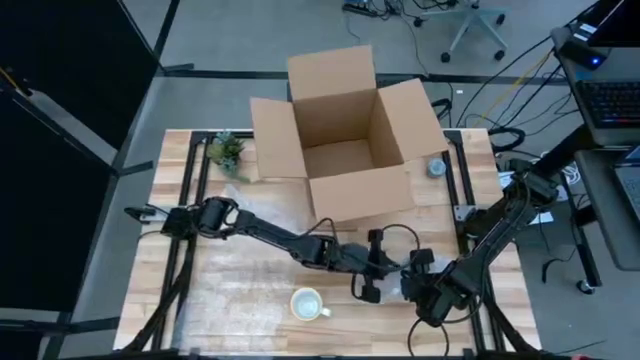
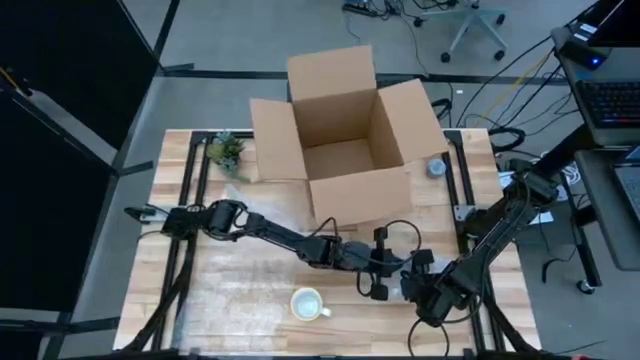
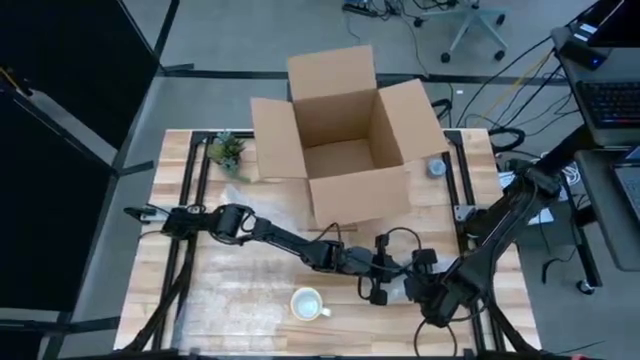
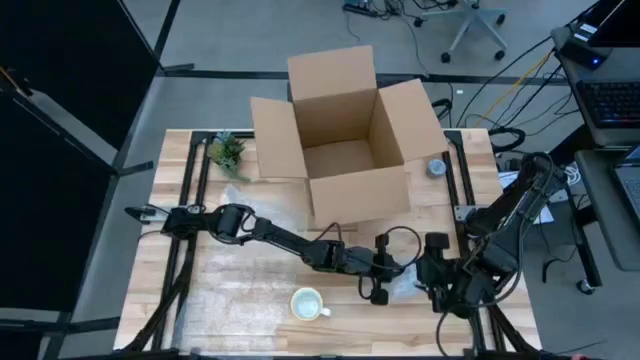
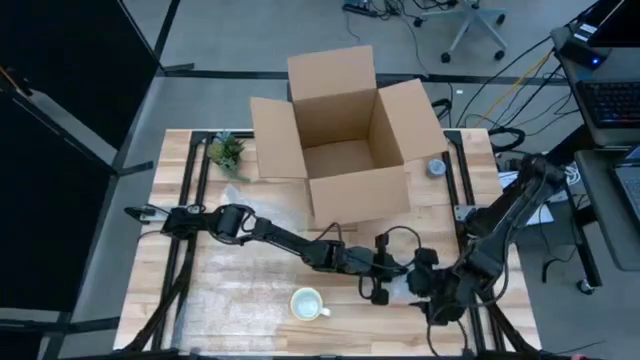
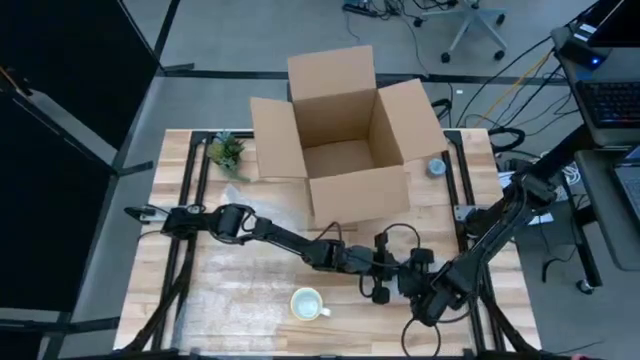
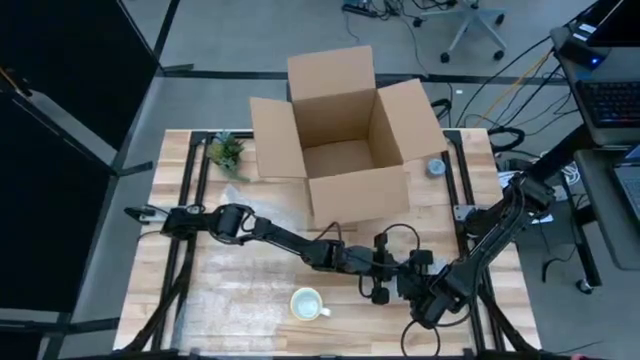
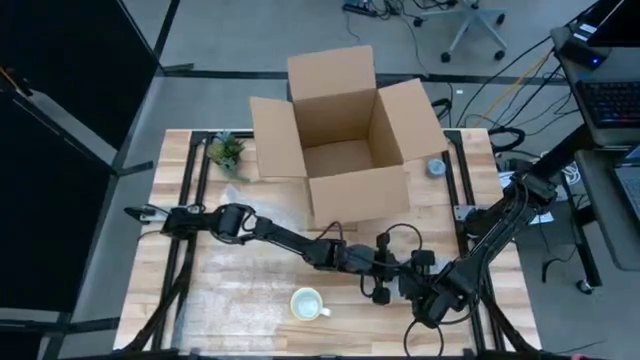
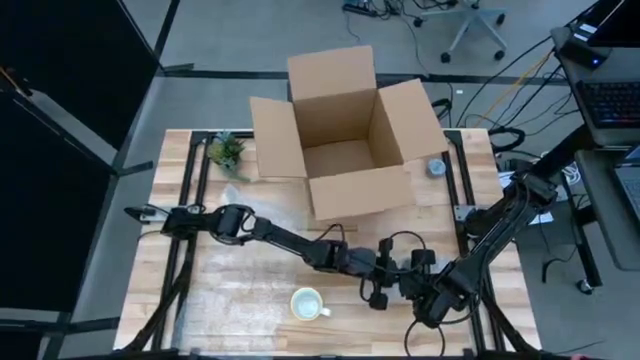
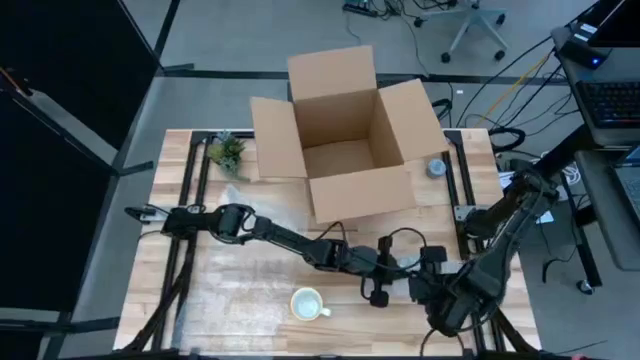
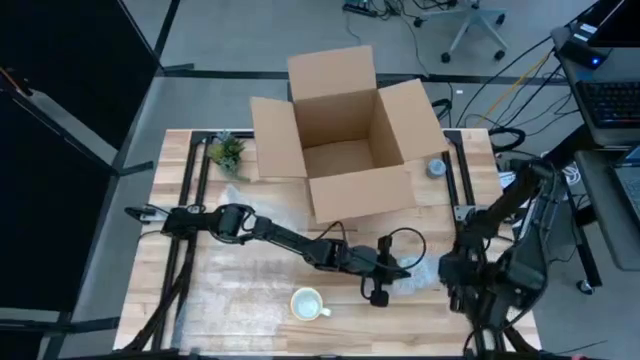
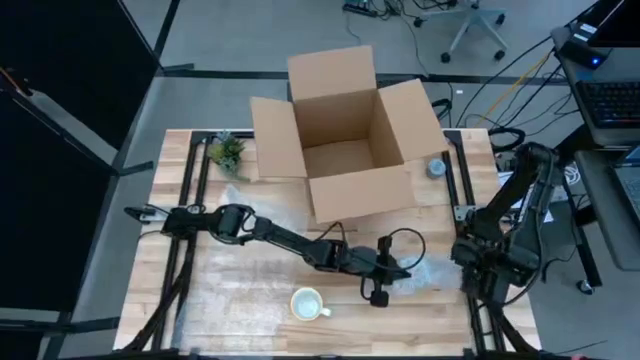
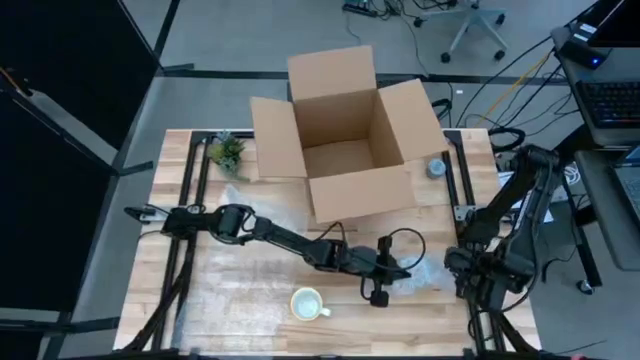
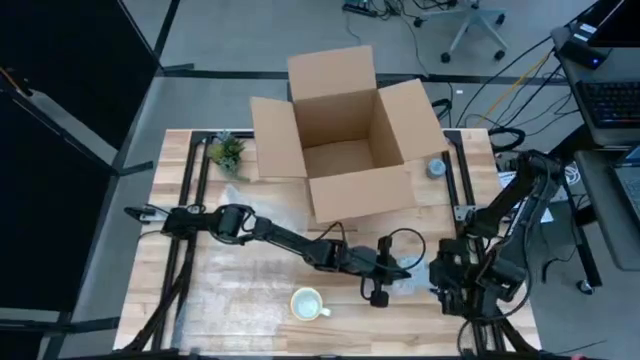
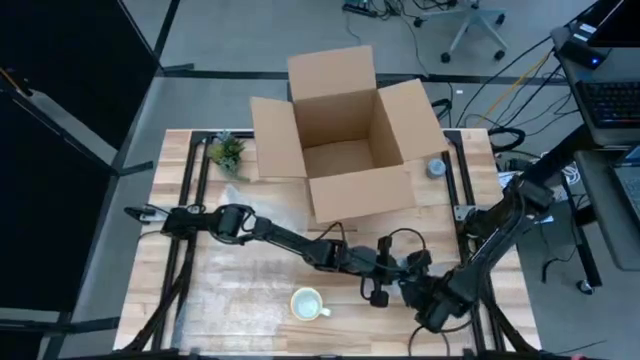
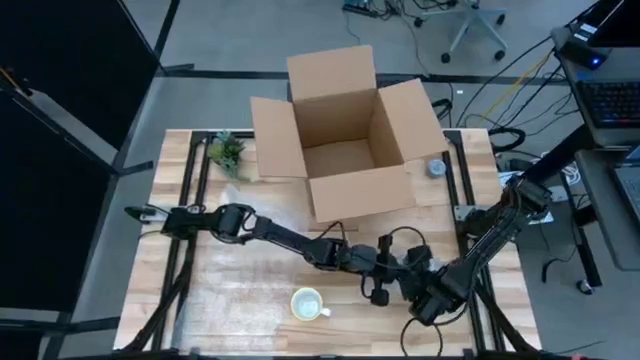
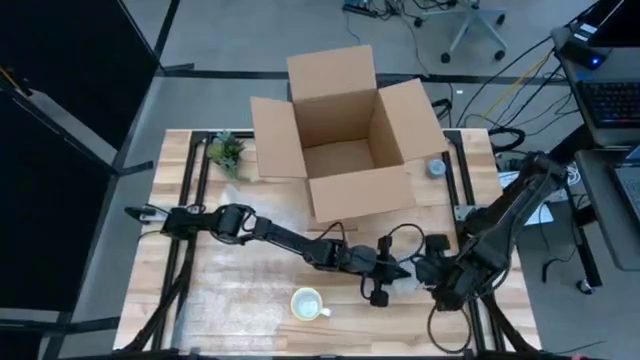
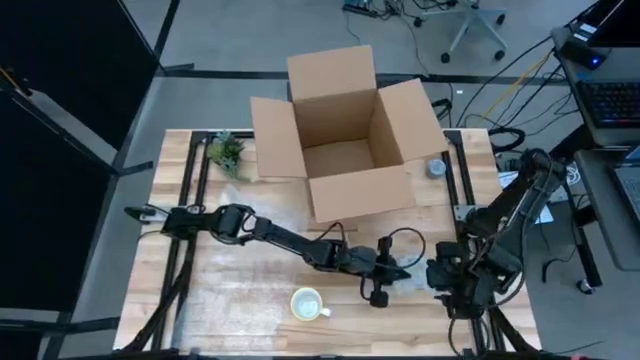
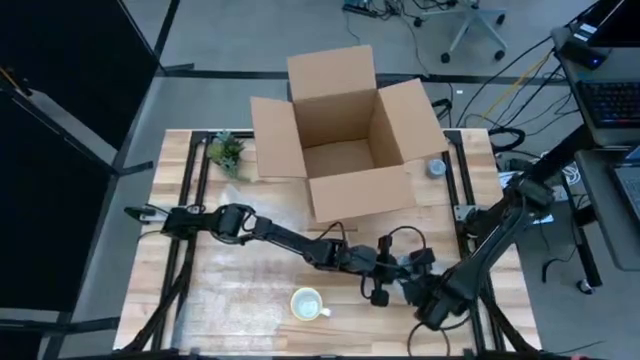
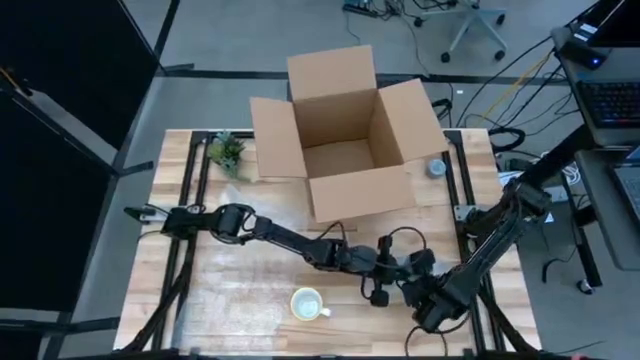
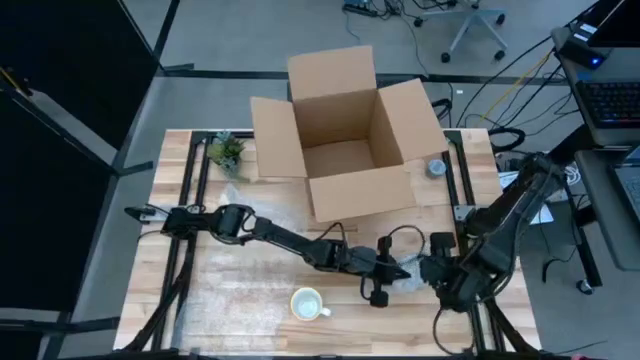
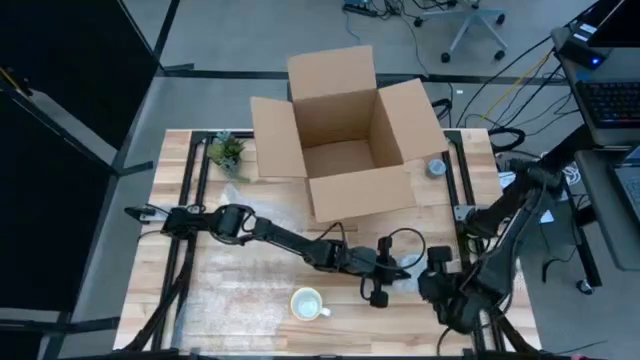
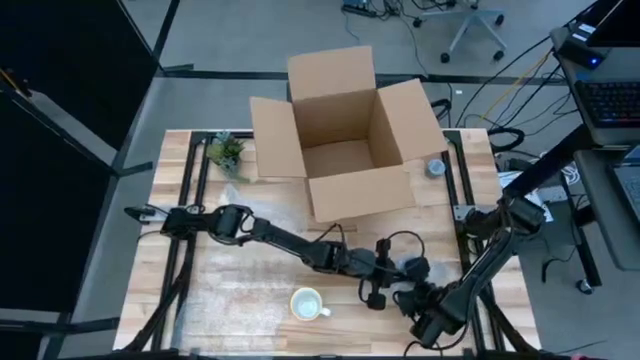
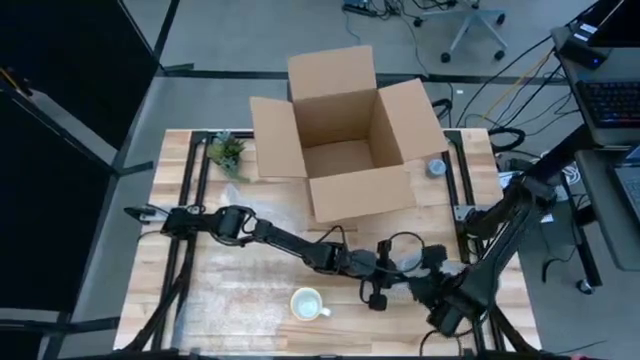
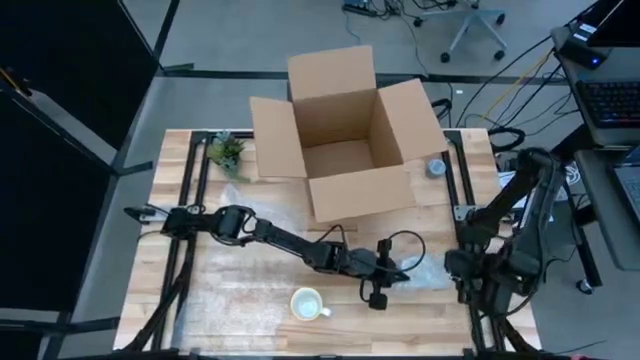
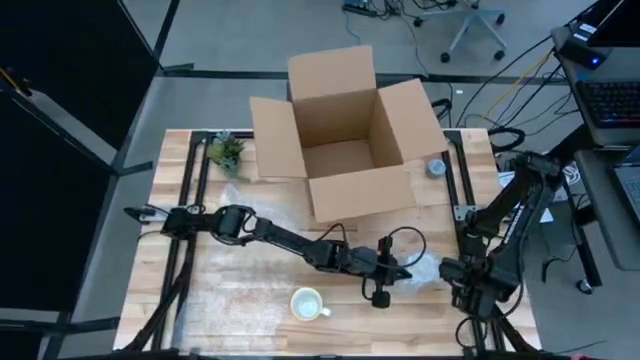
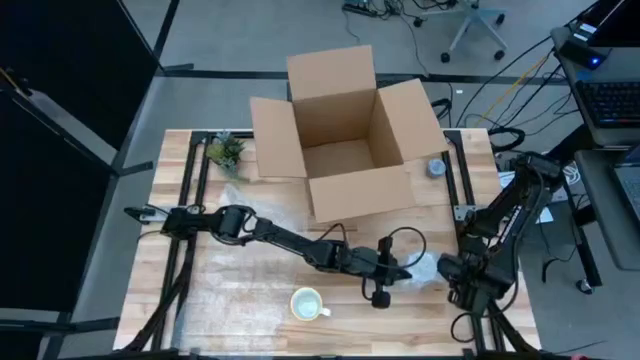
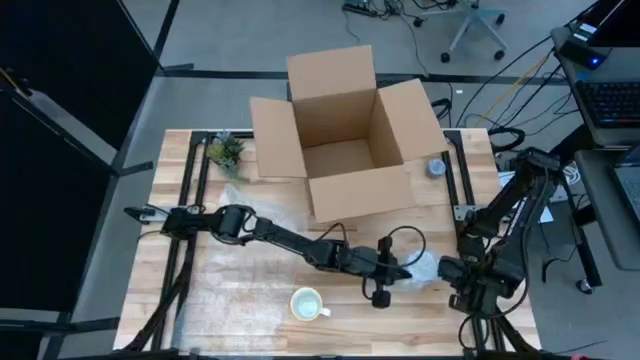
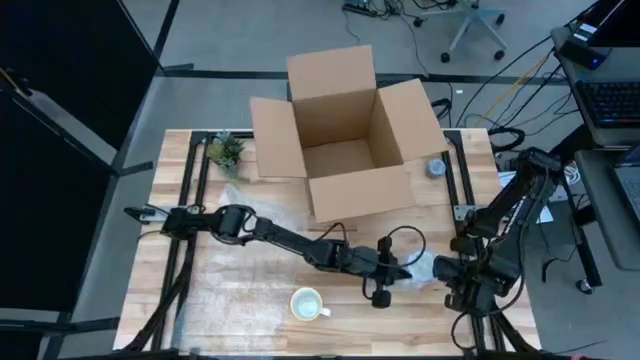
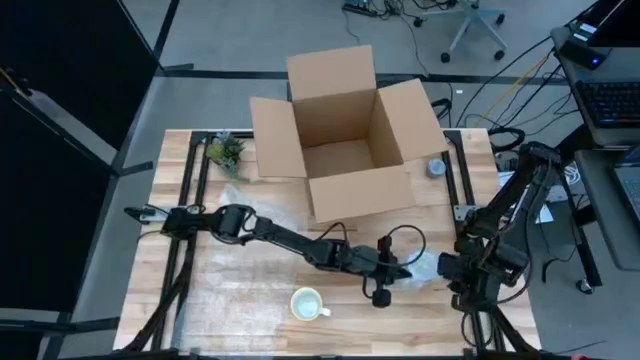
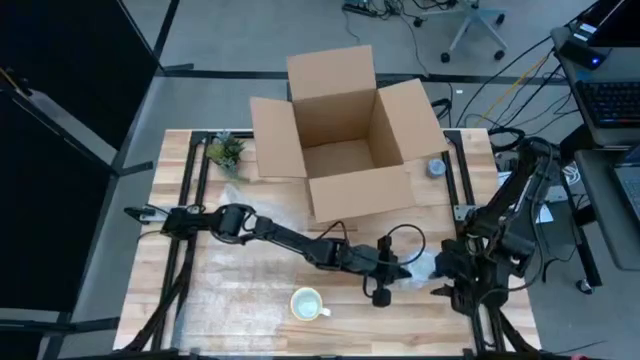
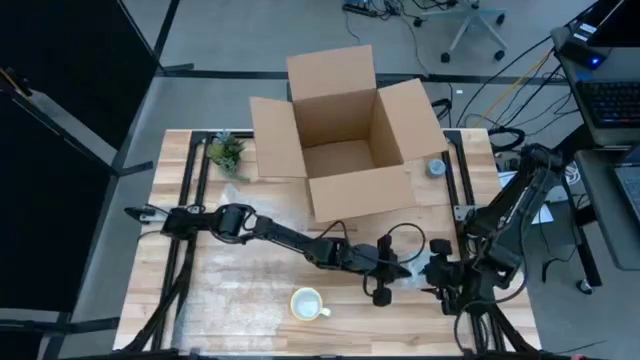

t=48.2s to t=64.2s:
Task: wrap mug
Wrap the red mug with bubble wrap

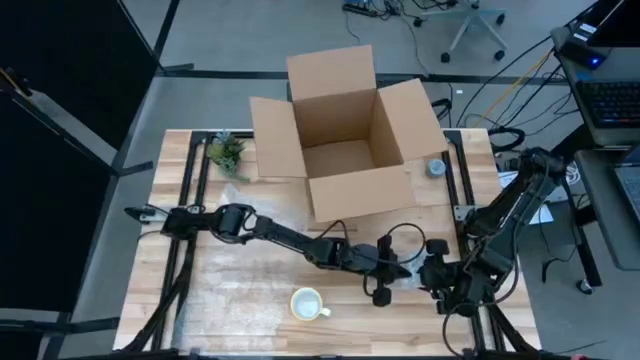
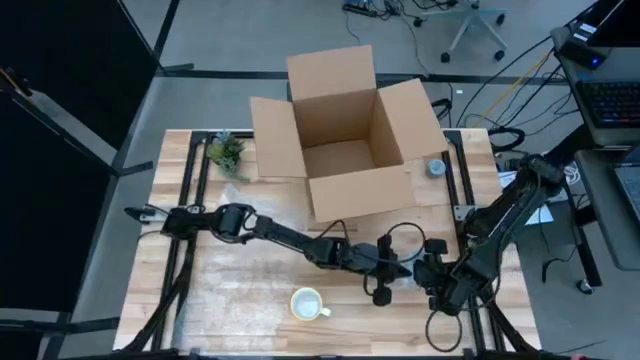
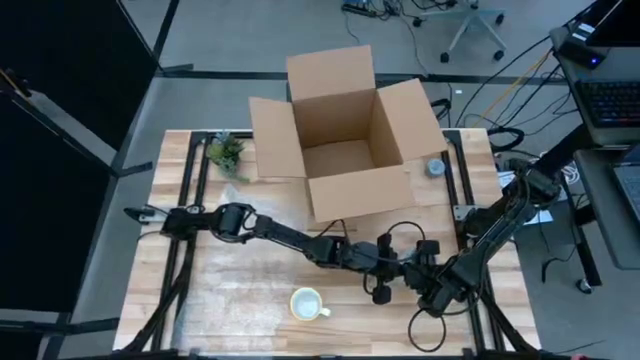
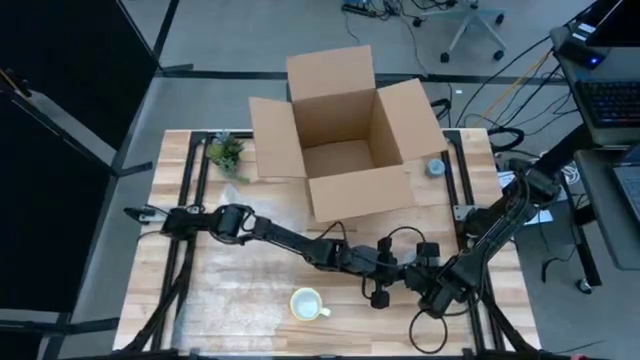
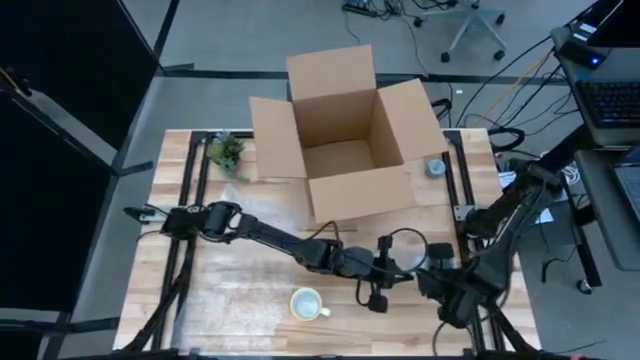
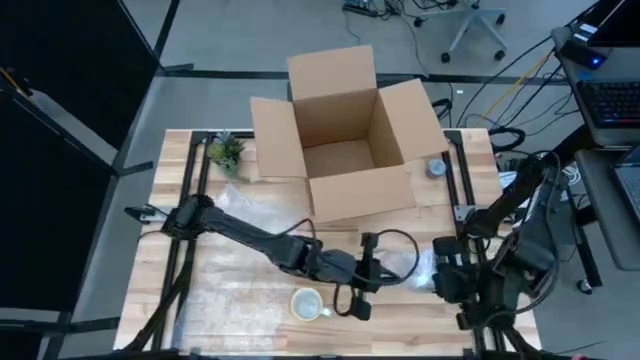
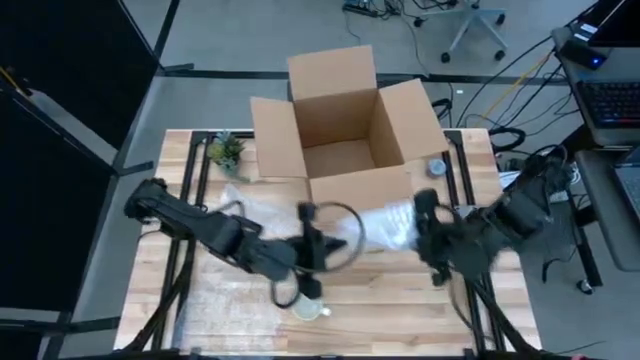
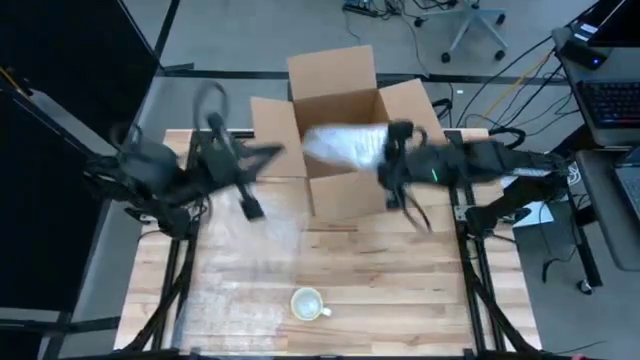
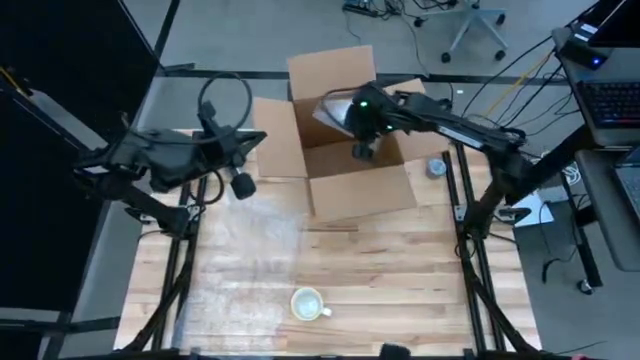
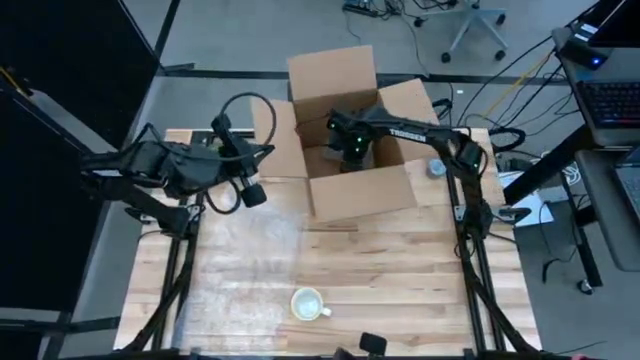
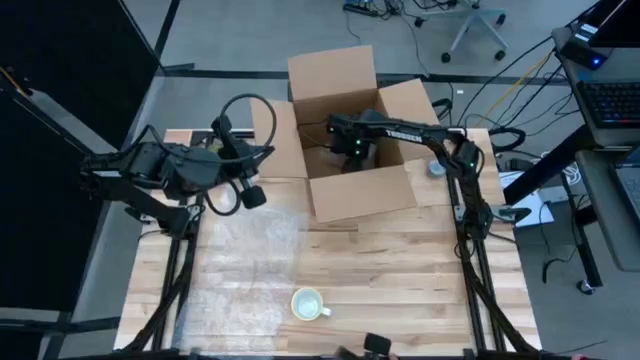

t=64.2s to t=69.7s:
Put the wrapped red mug into the cardboard box
